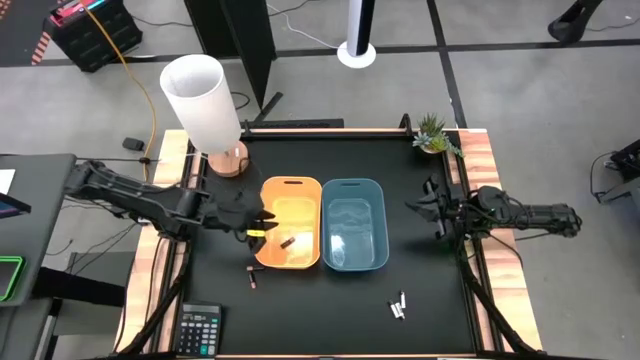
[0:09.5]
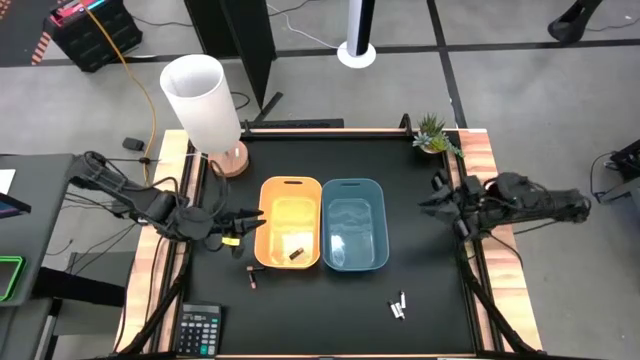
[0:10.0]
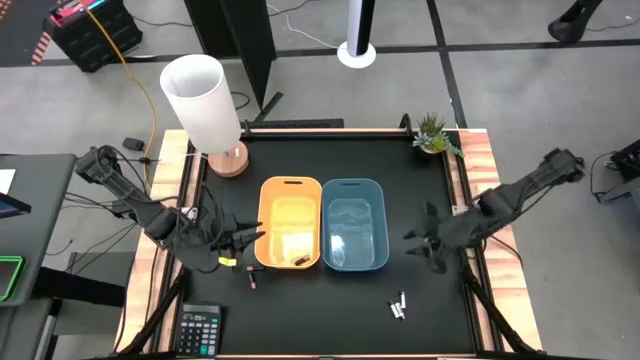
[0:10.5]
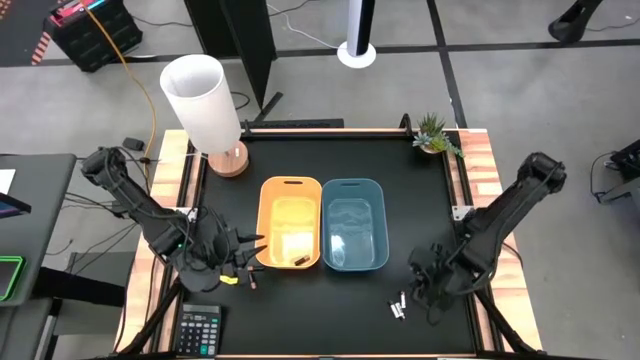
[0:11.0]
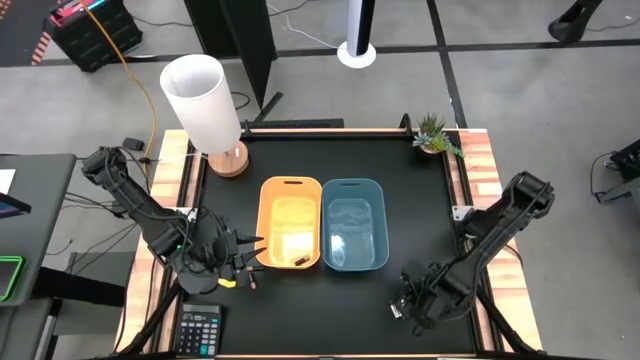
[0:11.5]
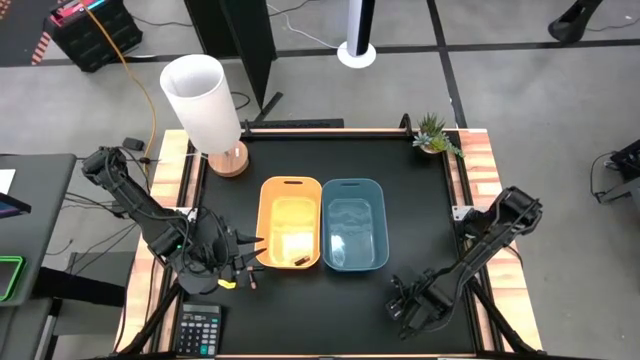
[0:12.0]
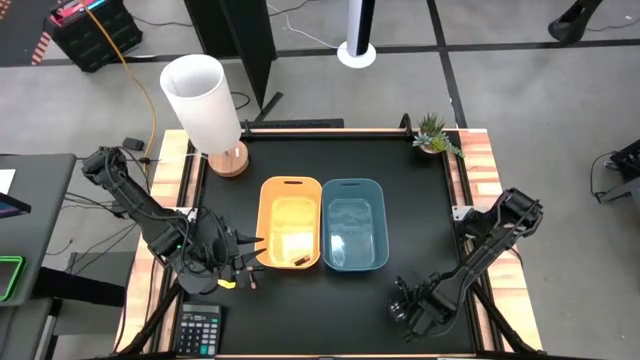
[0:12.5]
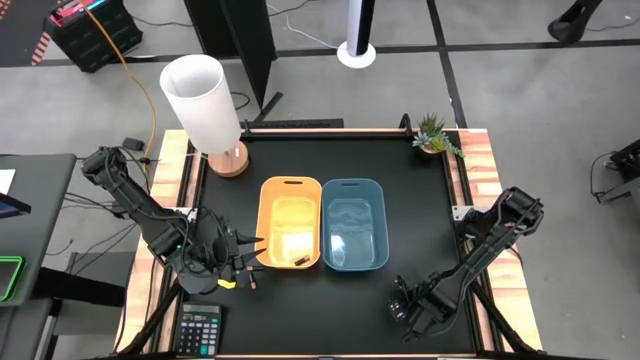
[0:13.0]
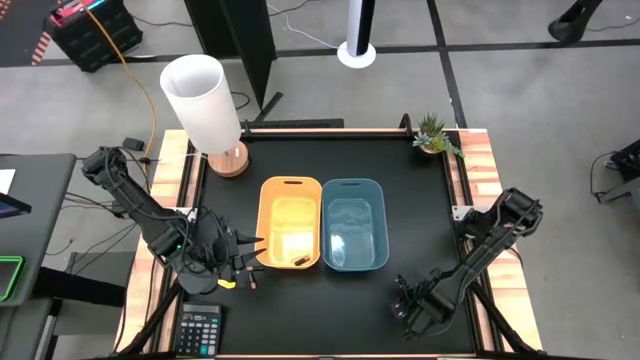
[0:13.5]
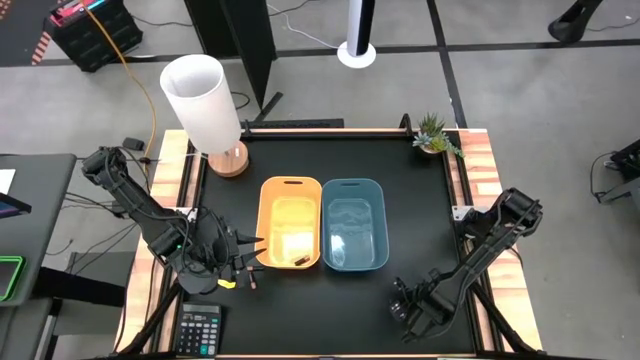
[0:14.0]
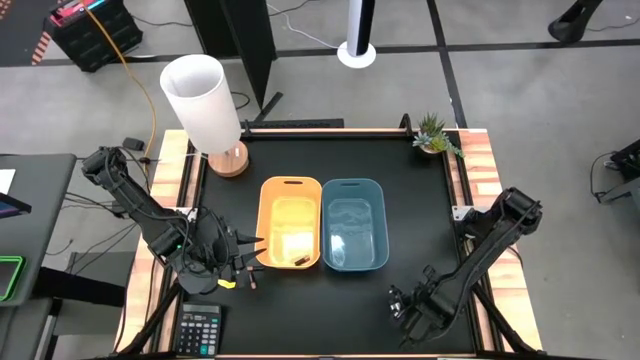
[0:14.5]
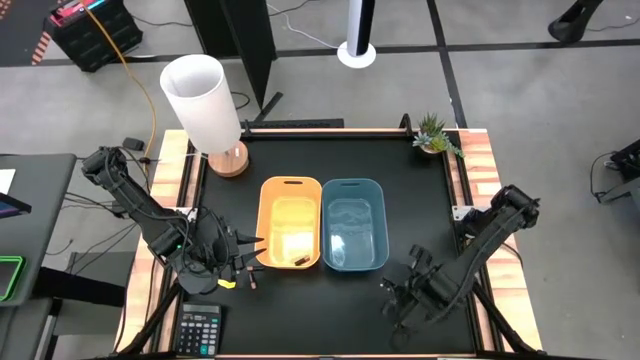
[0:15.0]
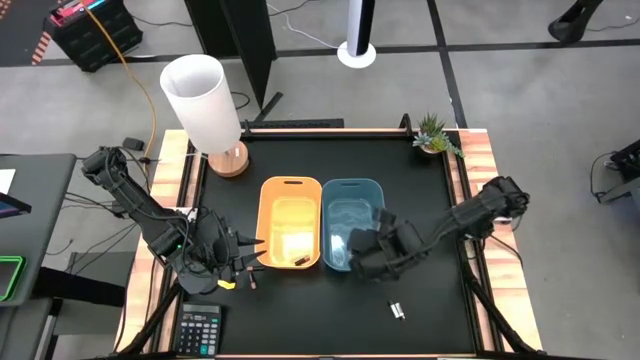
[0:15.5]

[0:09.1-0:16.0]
Task: Sort batteries
Put the right silver battery into the blue bin

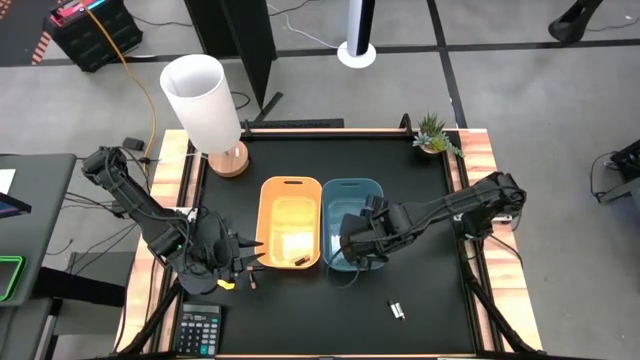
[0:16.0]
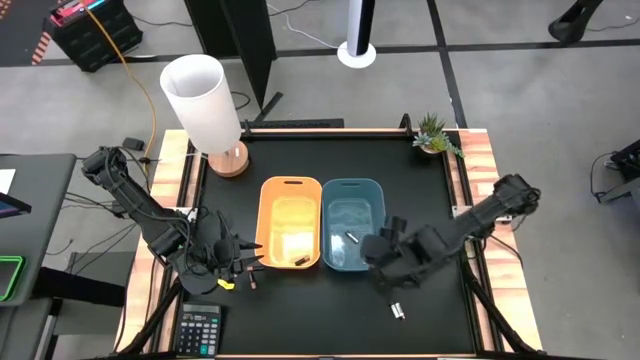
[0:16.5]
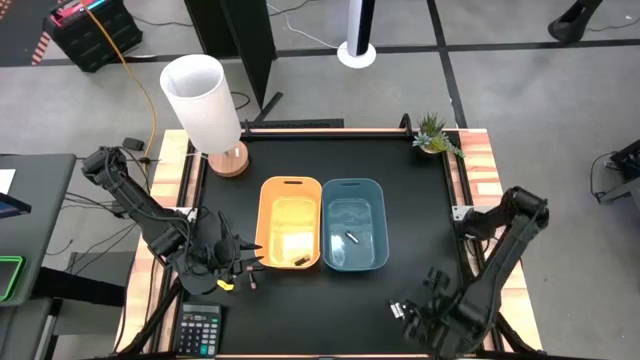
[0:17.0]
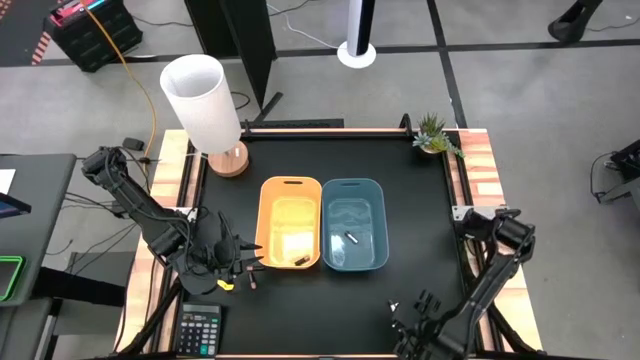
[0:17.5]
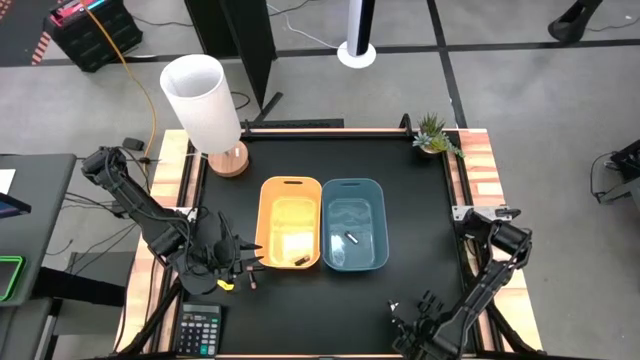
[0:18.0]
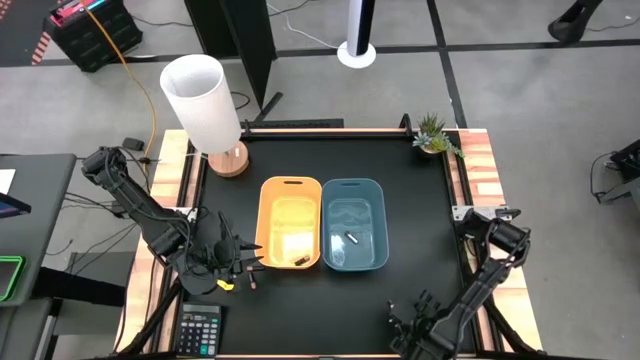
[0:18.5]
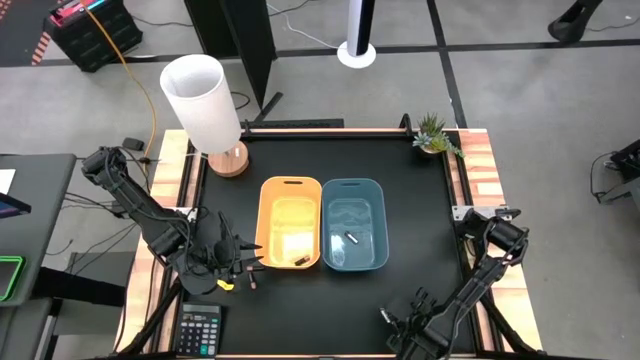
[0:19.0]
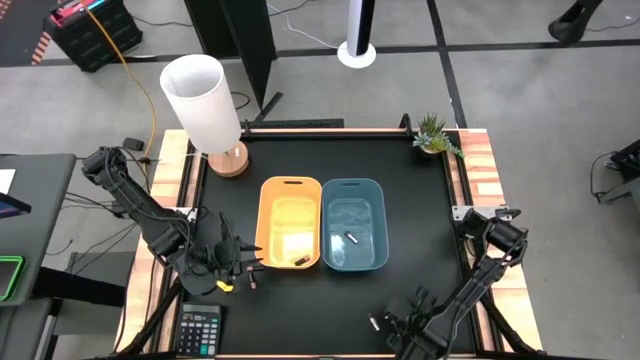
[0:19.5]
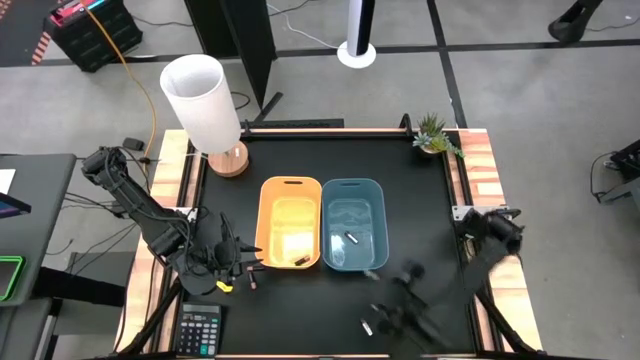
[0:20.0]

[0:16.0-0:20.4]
Put the right silver battery into the blue bin

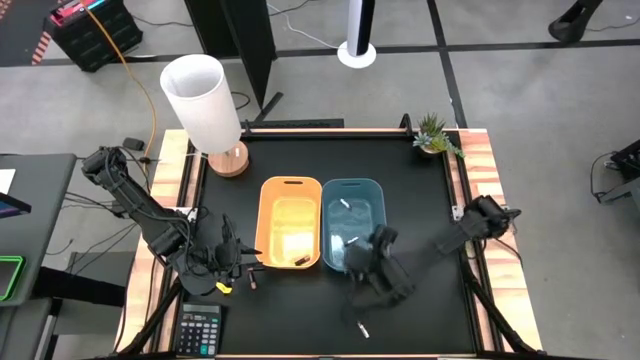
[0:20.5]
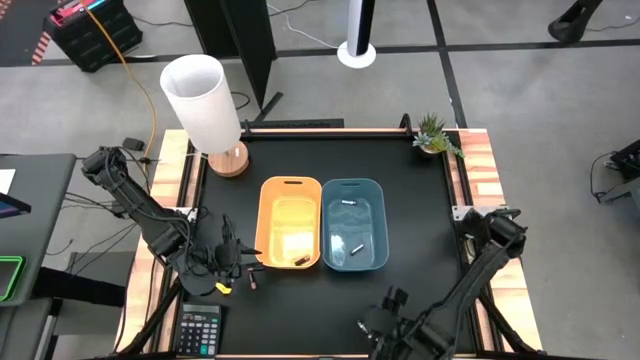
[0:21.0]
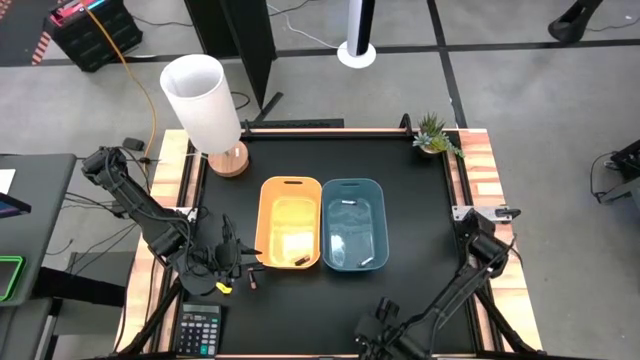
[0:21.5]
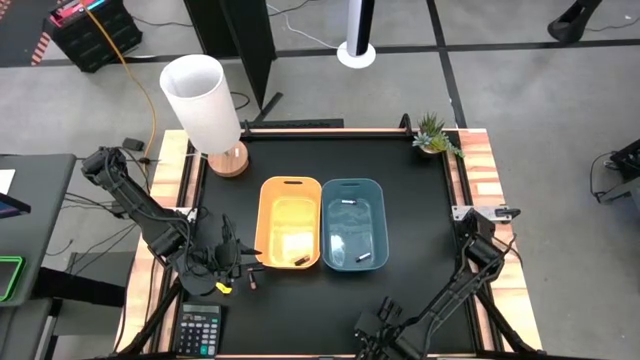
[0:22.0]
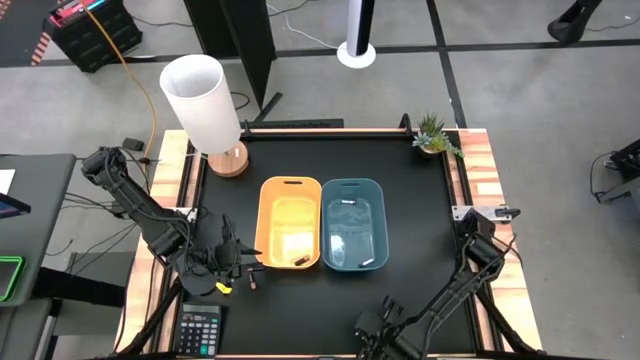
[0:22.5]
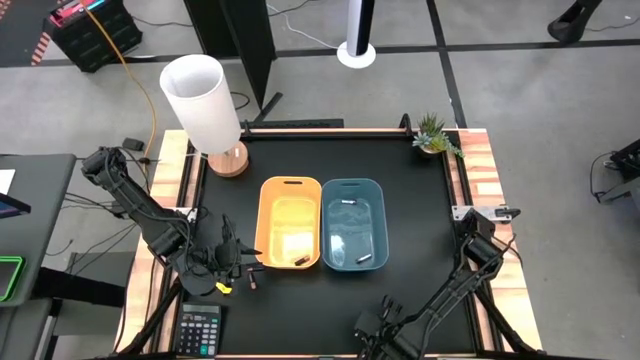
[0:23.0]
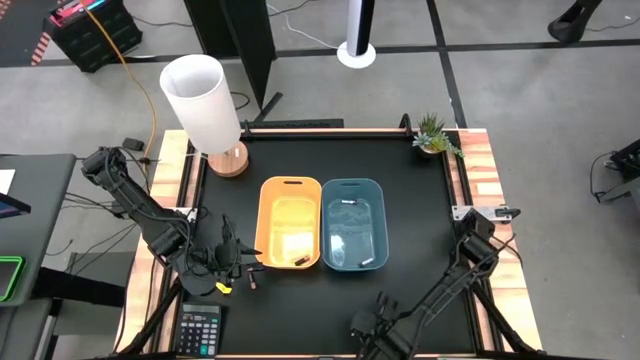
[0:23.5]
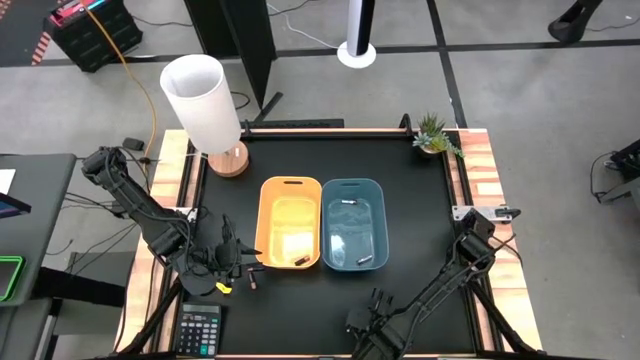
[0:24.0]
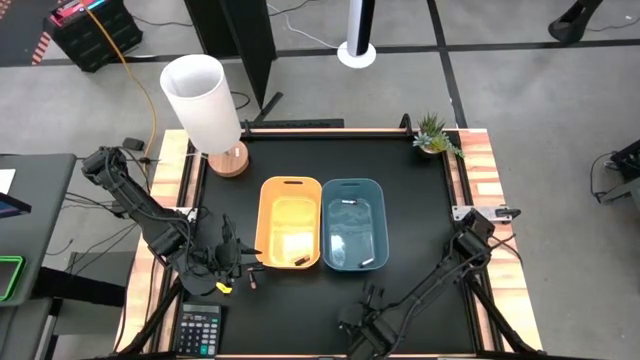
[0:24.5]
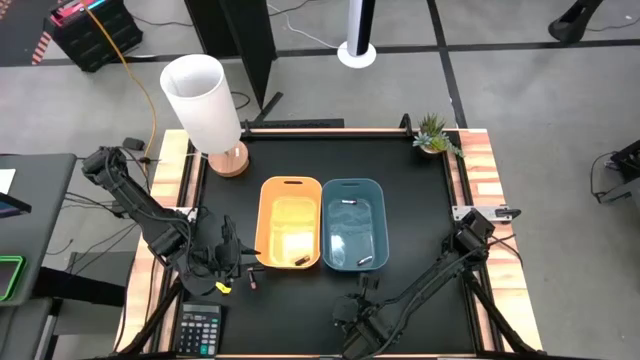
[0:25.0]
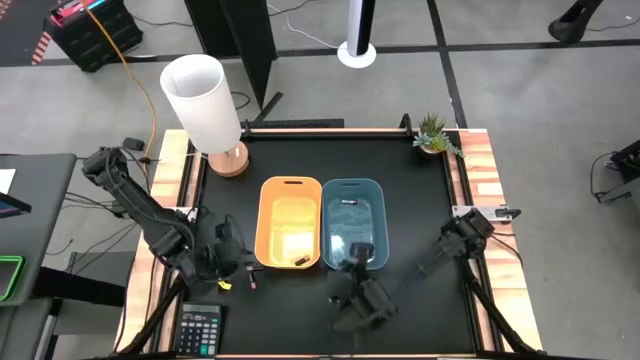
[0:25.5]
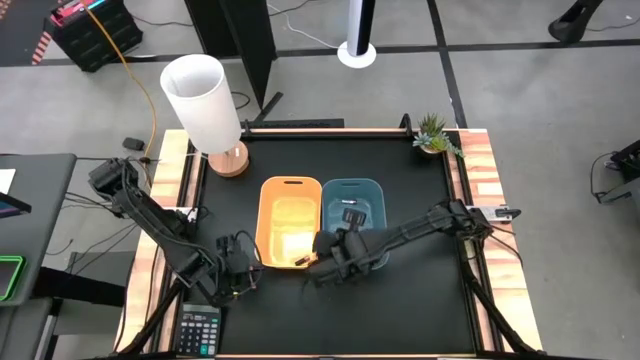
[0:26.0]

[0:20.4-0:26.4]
Put the silver battery into the blue bin

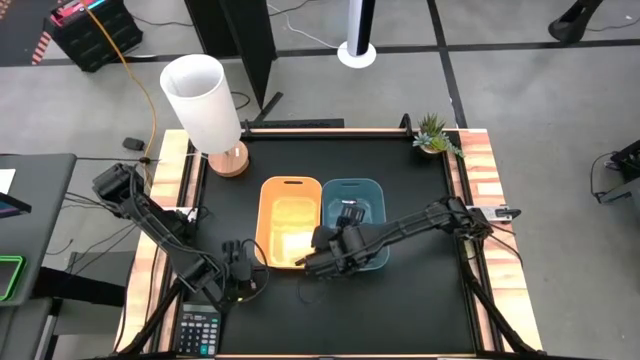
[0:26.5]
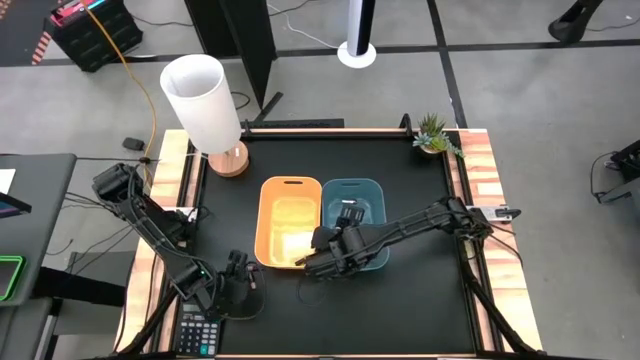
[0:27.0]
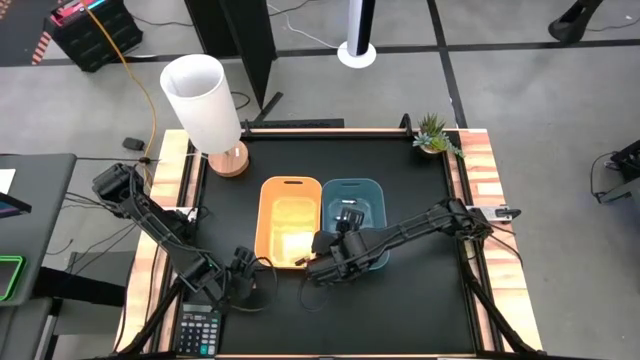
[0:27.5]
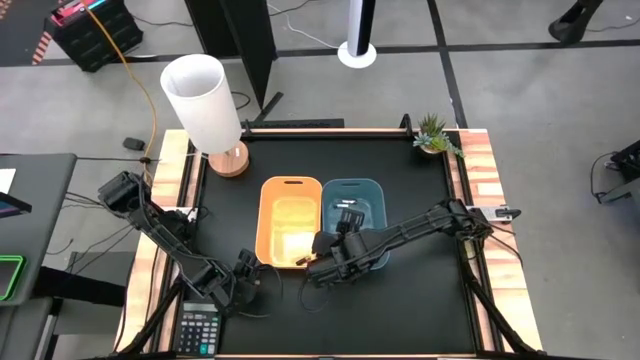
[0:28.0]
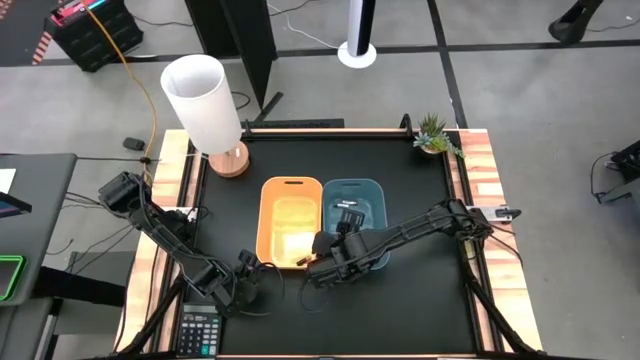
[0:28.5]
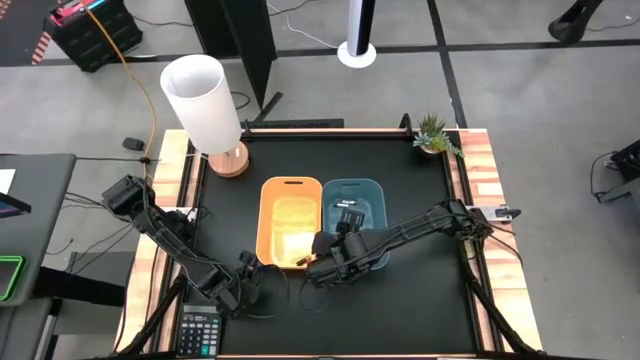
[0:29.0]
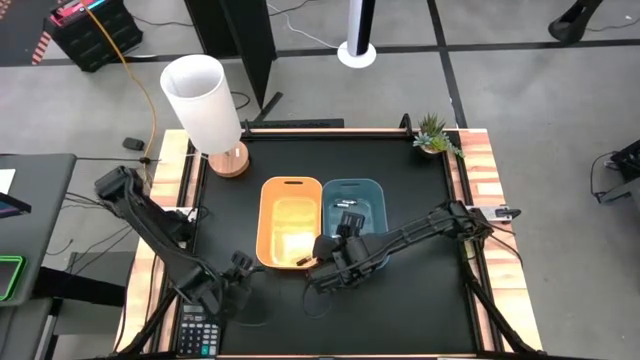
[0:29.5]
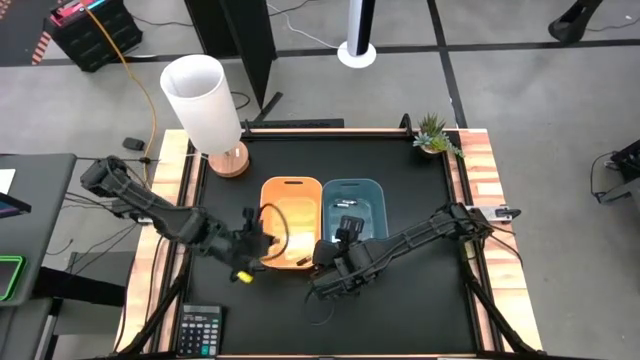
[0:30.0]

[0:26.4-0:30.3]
Put the bottom black battery into the orange bin
